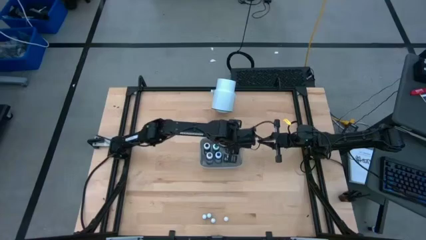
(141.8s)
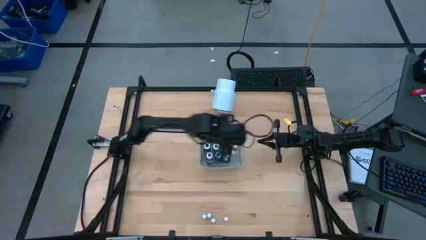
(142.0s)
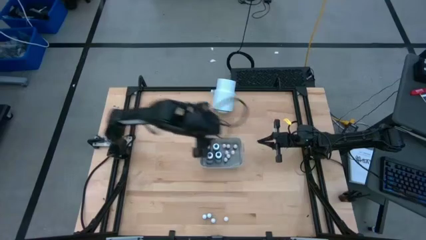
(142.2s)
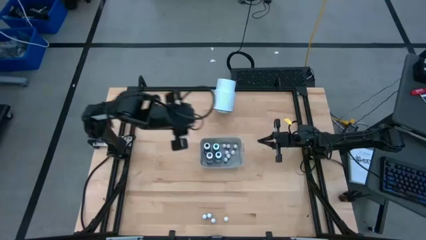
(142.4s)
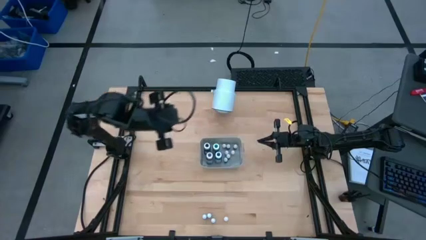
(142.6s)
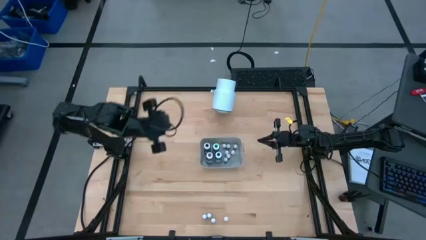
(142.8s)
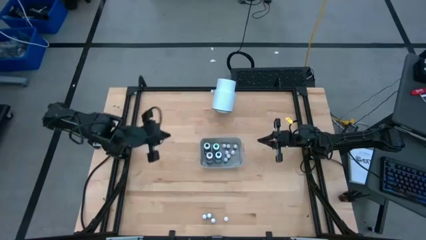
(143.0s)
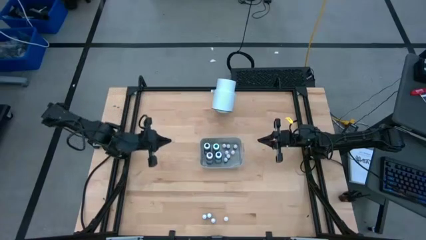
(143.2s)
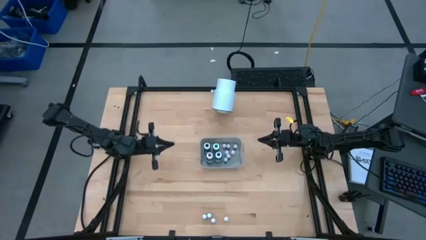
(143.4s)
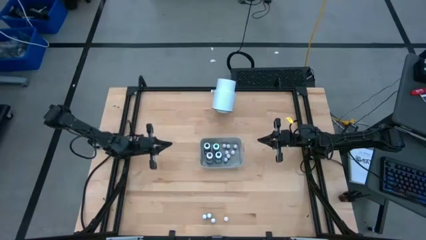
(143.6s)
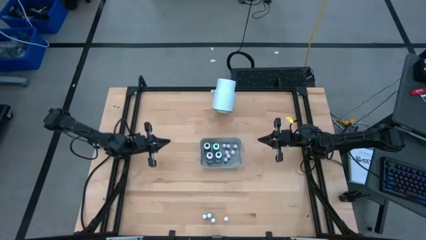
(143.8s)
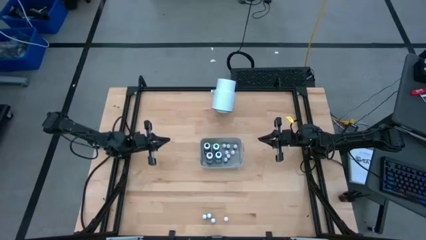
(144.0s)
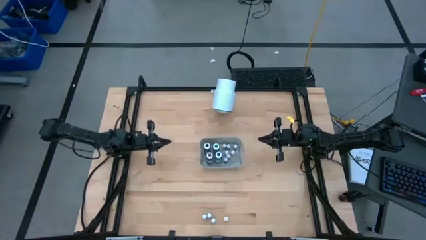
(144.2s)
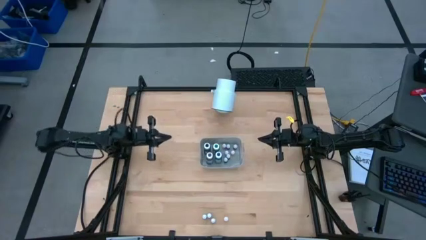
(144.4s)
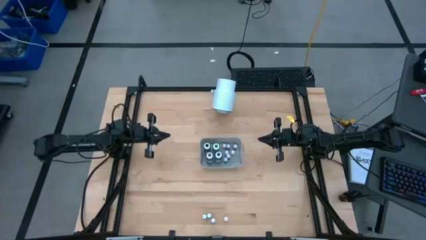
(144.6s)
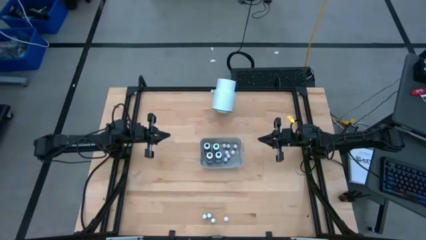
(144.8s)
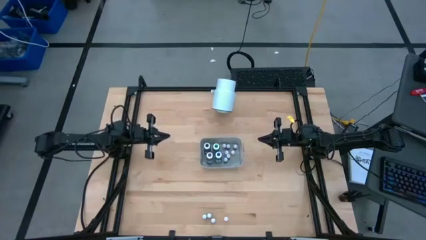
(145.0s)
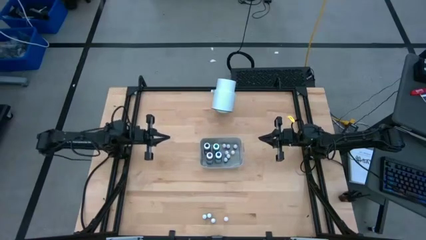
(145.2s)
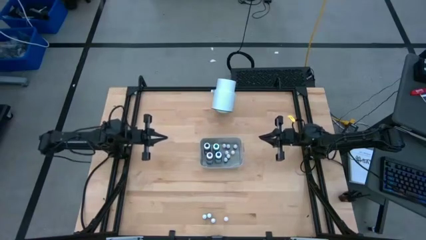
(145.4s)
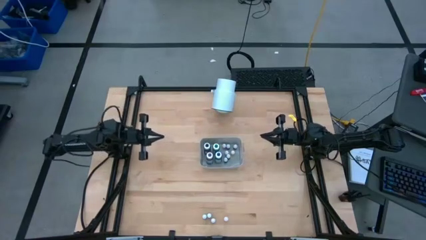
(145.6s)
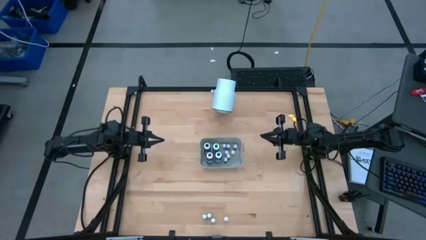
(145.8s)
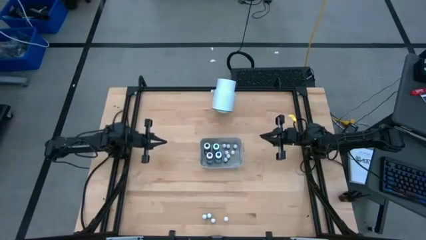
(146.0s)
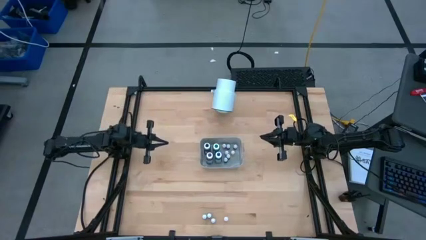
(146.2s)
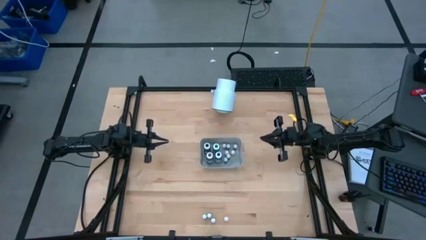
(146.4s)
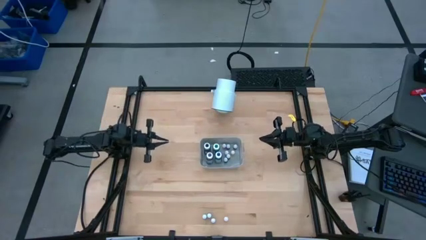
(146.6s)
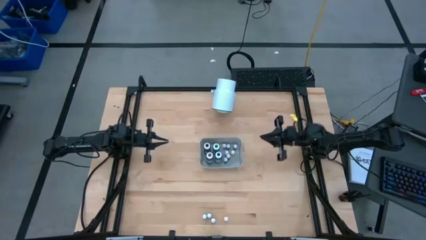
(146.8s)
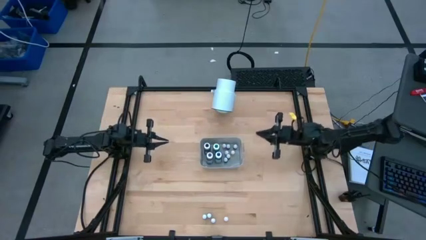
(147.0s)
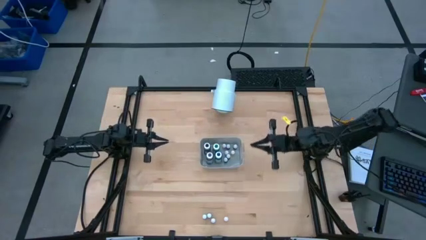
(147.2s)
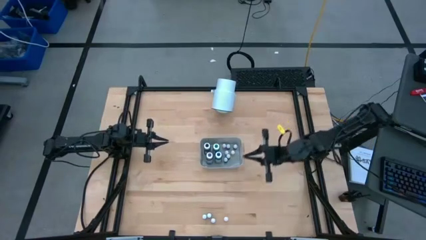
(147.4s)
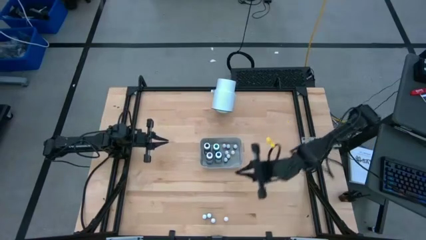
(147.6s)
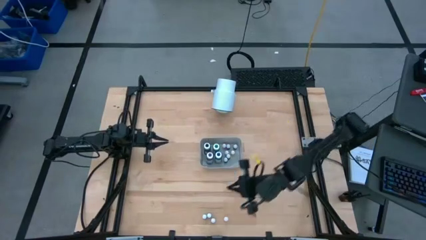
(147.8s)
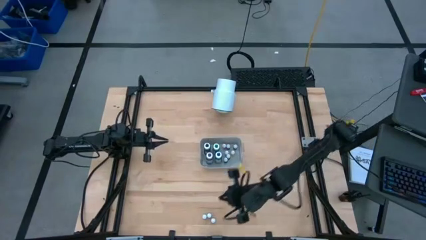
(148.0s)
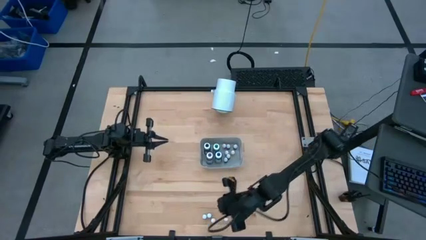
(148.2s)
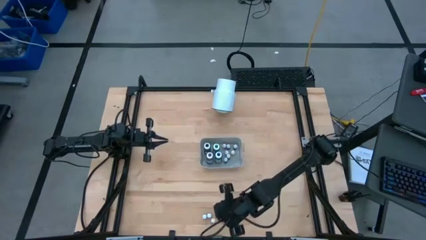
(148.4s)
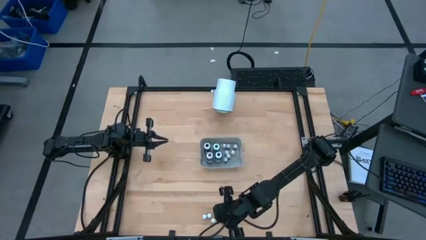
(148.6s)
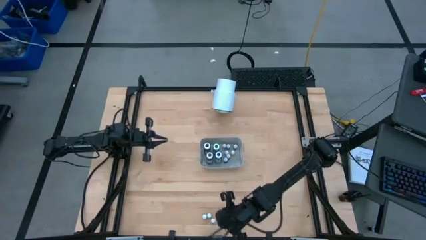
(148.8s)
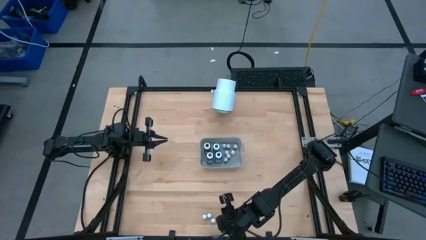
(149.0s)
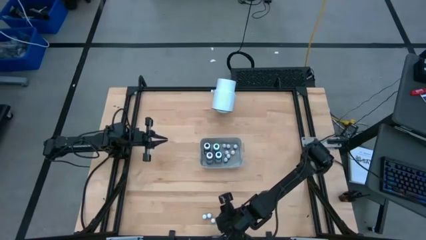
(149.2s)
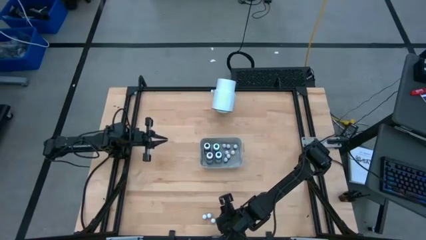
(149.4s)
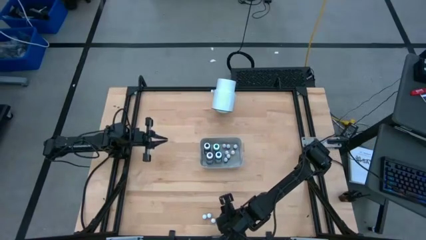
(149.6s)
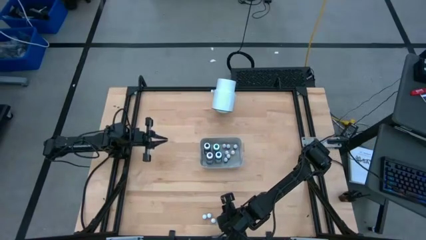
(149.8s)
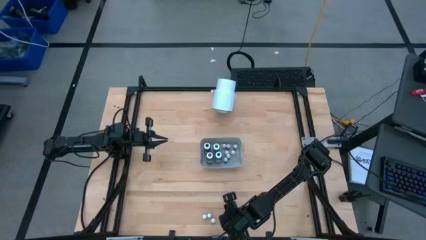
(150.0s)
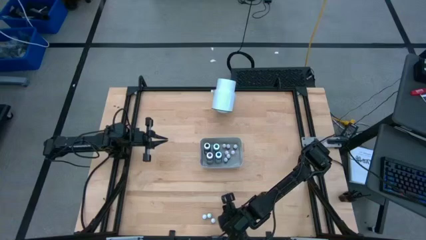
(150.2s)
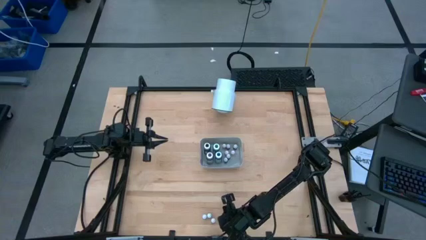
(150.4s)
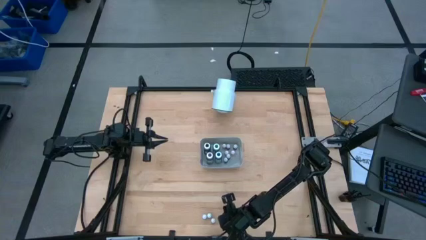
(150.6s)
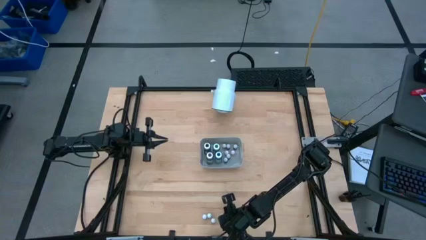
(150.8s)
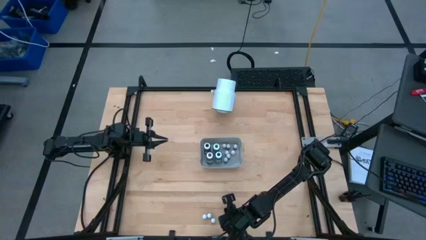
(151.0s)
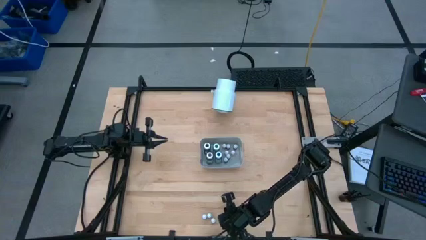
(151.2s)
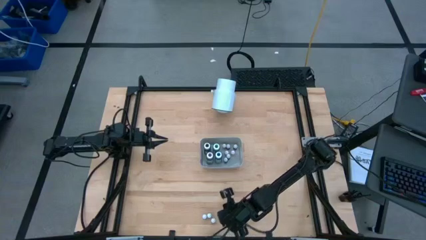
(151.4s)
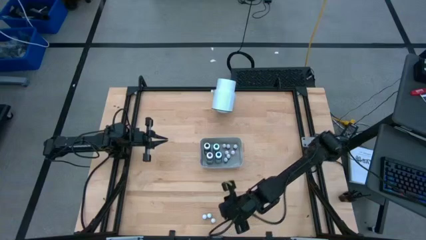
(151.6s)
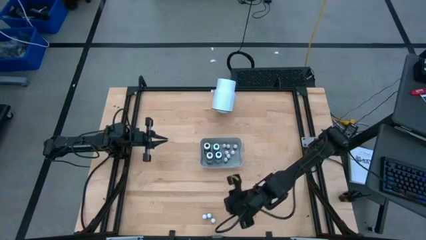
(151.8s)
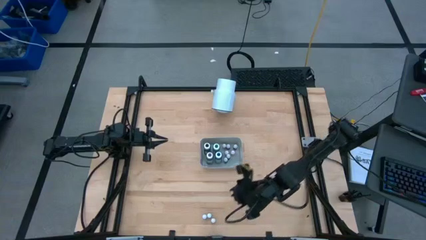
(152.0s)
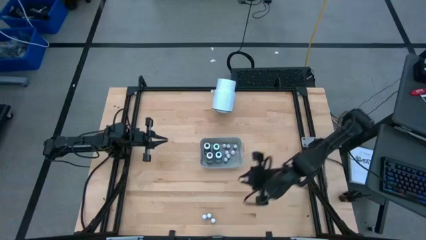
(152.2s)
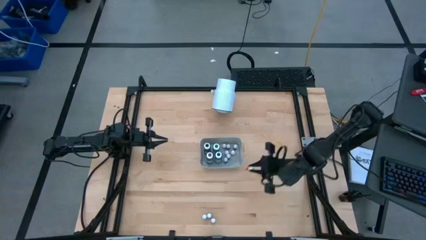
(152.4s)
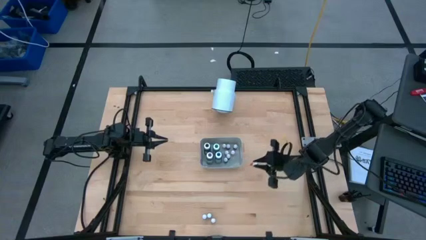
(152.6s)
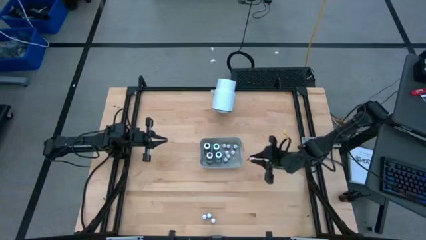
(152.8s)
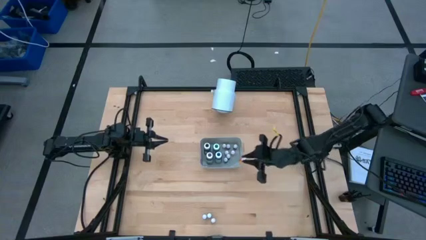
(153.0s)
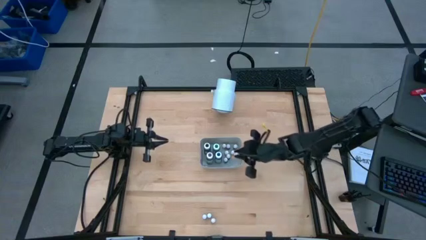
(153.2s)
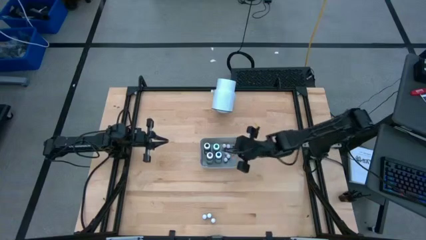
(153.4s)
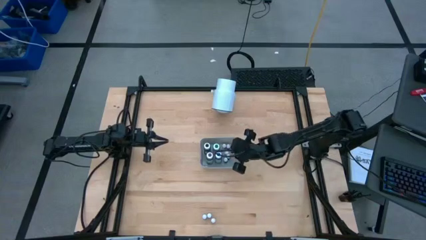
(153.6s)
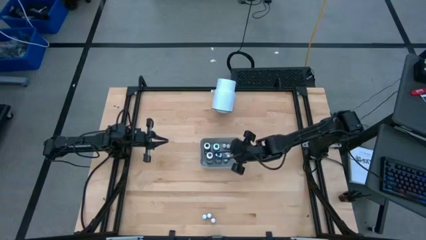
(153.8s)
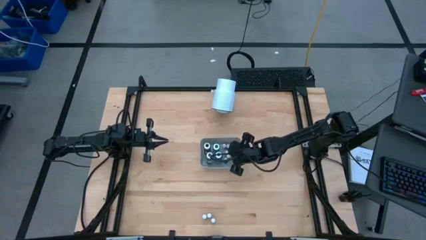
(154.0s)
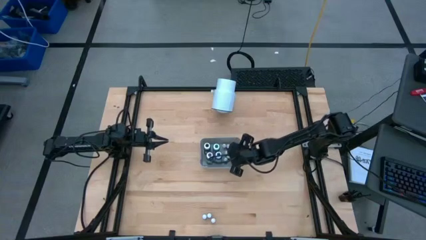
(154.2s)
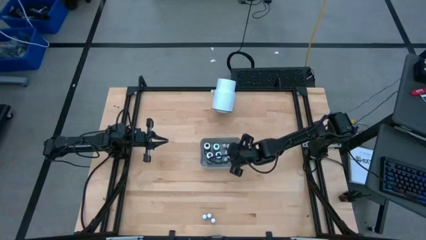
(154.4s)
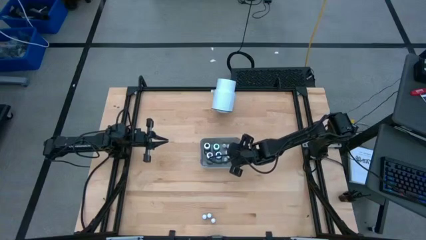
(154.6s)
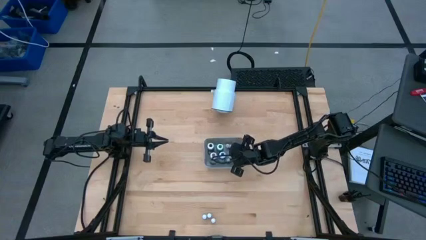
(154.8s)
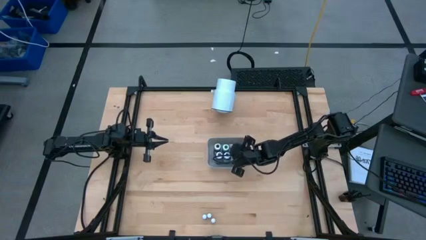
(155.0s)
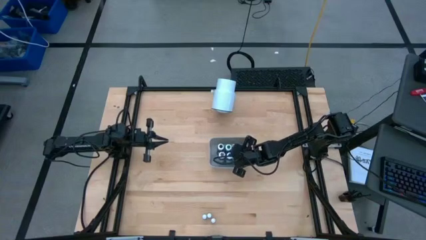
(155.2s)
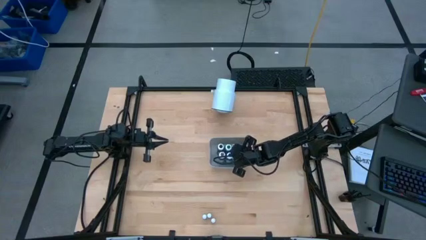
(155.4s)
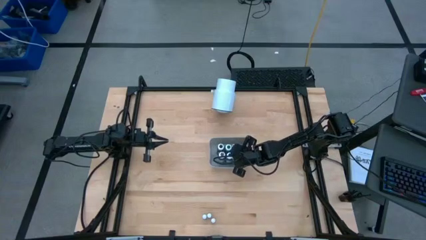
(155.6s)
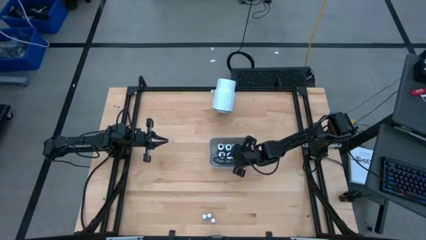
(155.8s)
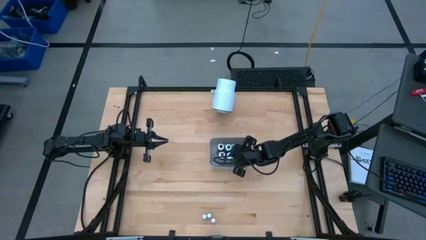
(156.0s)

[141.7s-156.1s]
Task: Pick & Place food coloring
Put the small yellow food coloring bottle into the gray bin

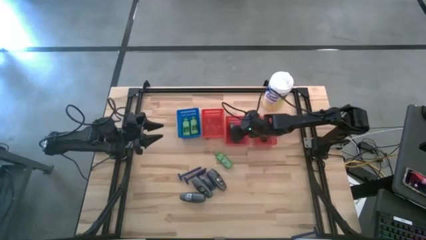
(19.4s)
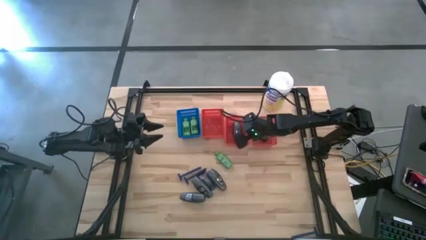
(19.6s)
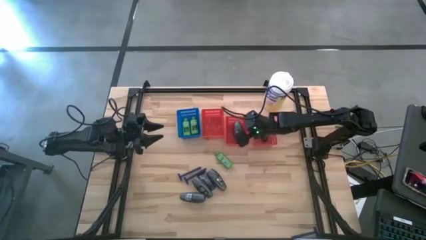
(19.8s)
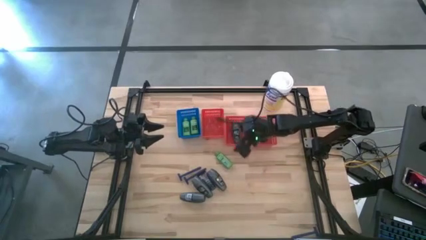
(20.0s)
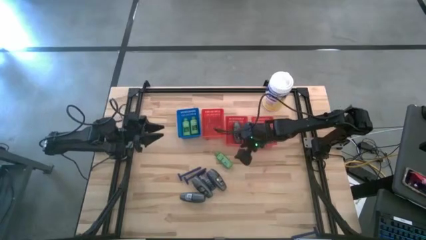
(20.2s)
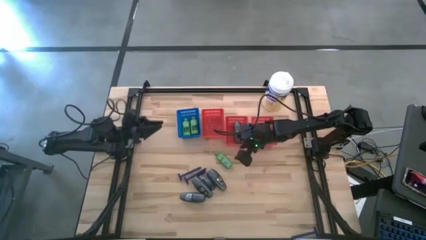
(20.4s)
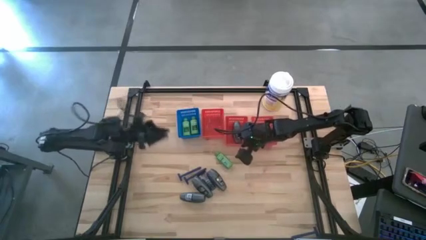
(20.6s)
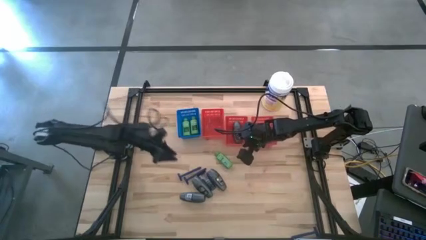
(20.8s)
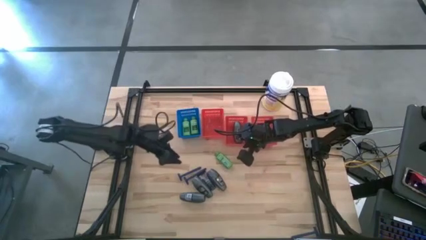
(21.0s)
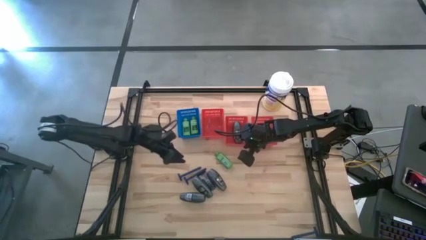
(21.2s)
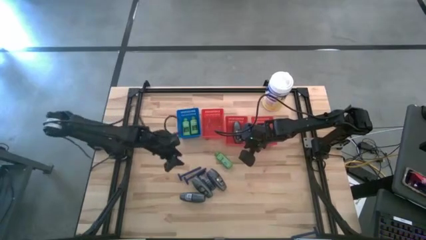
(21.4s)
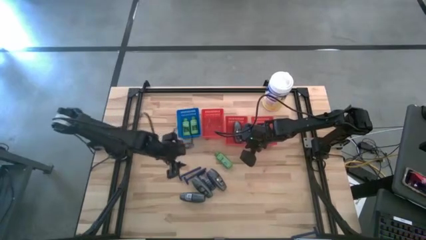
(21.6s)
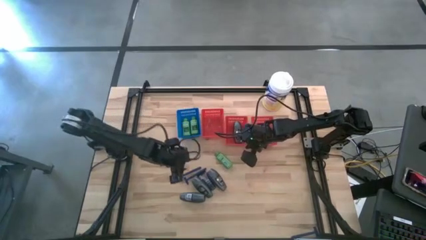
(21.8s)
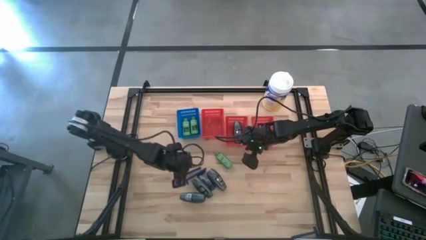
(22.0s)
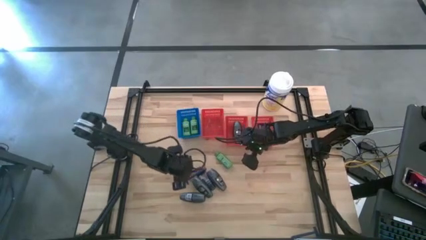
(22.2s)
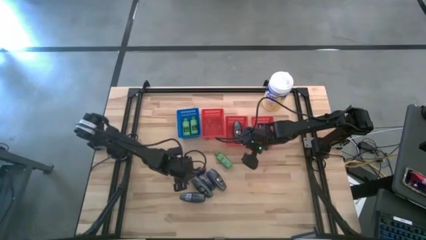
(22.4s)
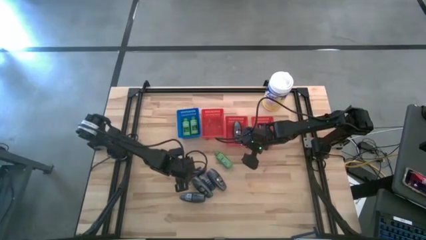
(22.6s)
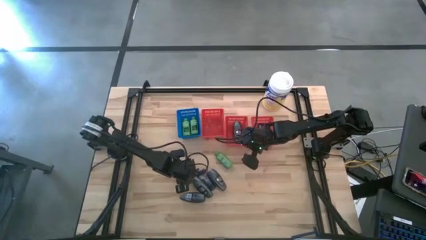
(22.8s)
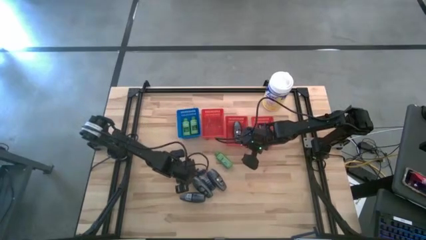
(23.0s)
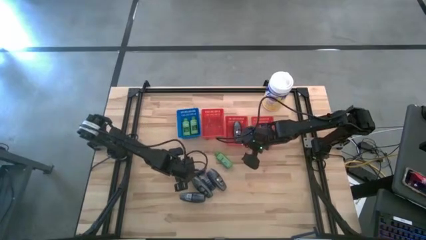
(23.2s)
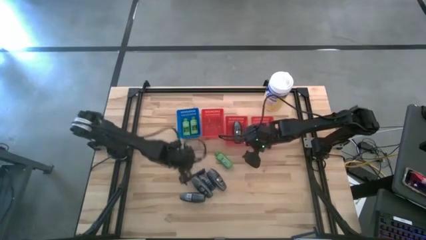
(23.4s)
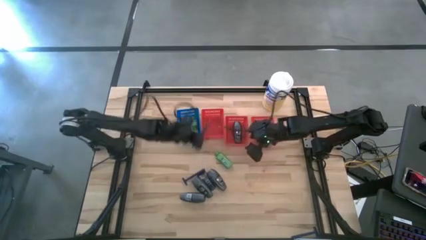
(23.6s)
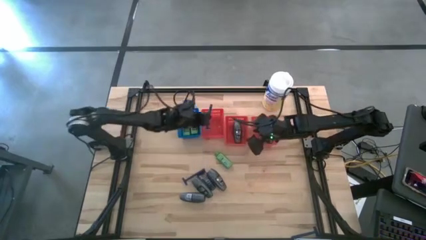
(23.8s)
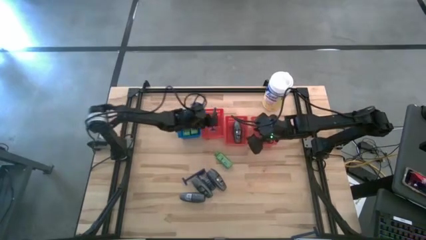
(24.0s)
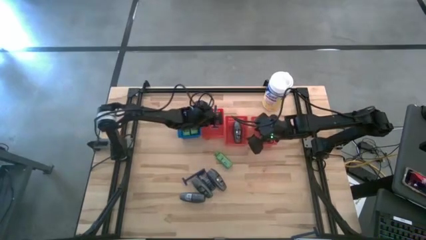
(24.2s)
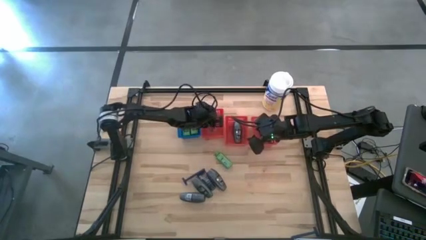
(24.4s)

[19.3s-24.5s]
Task: Pick & Place Travel size toiletries
Put the blue razor into the left red bin
